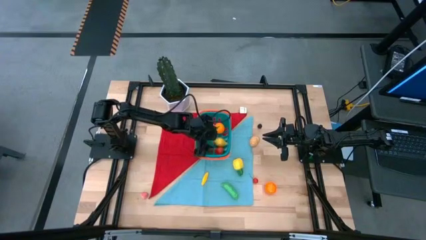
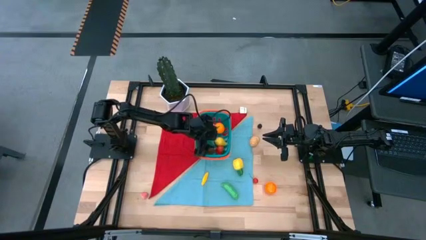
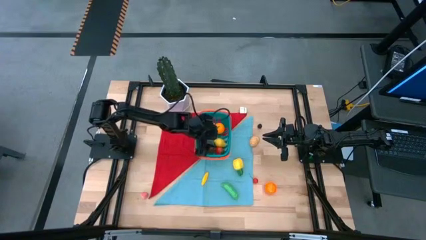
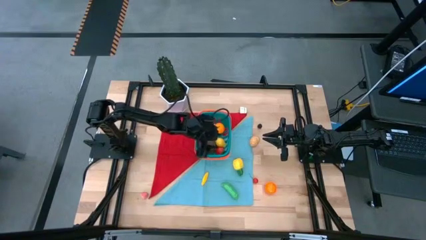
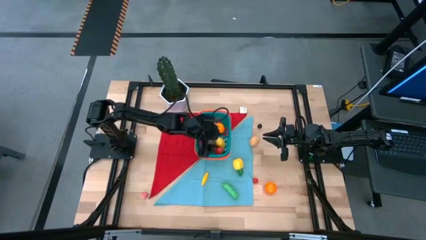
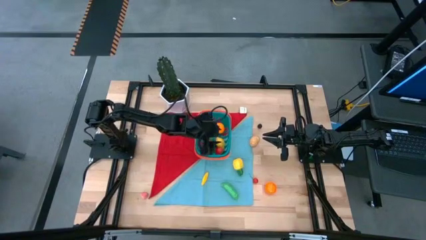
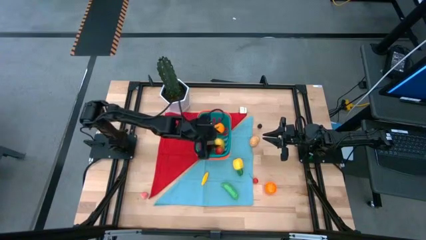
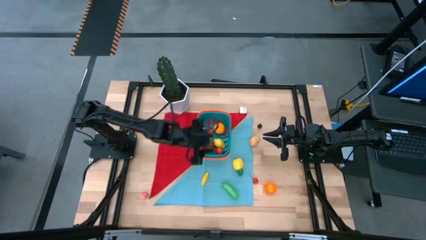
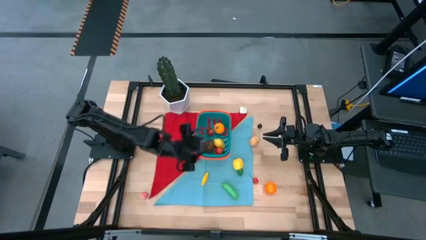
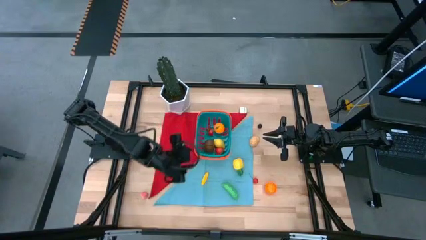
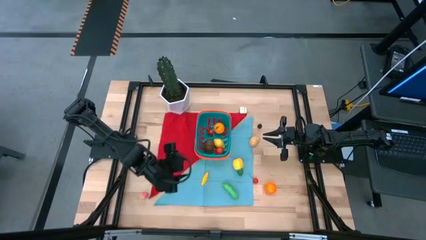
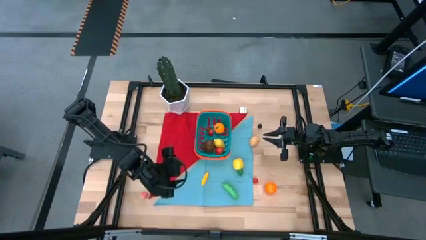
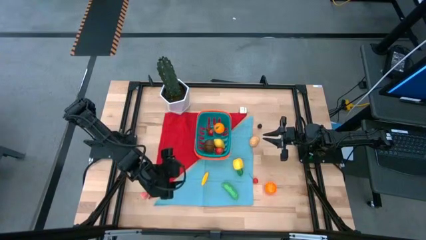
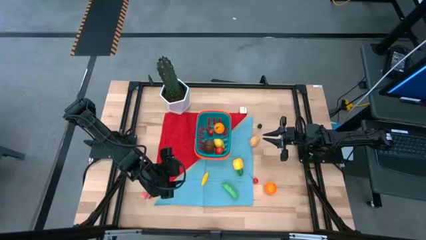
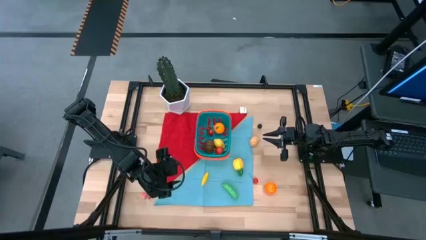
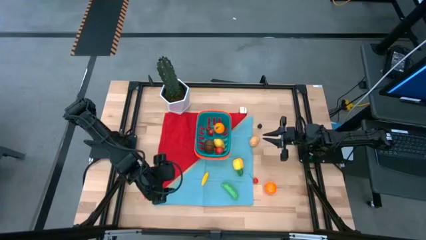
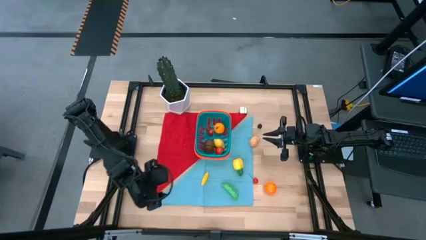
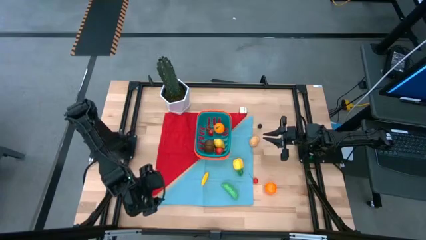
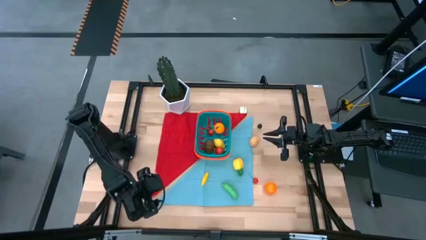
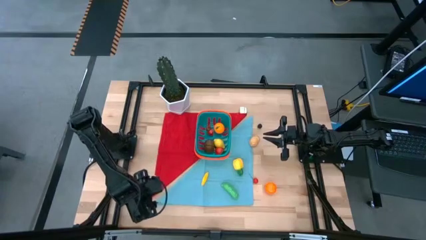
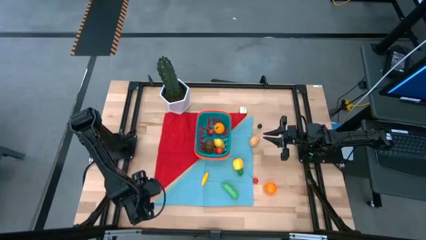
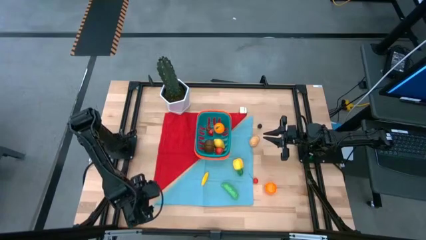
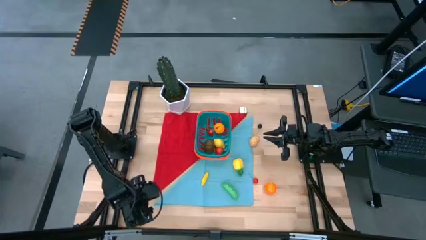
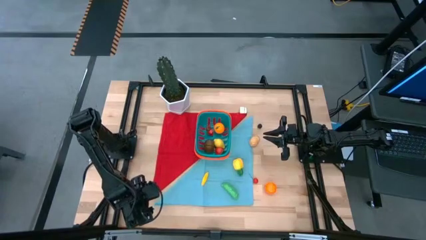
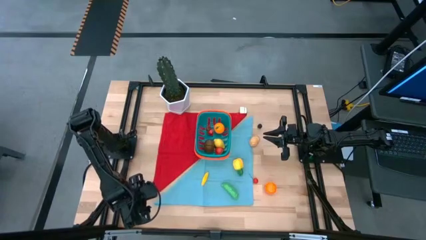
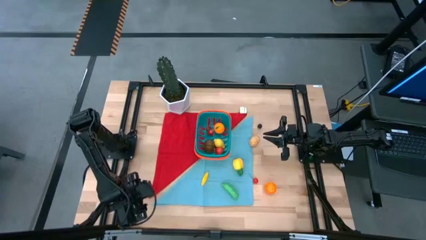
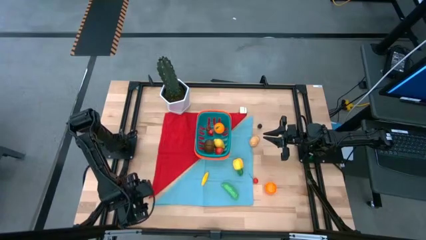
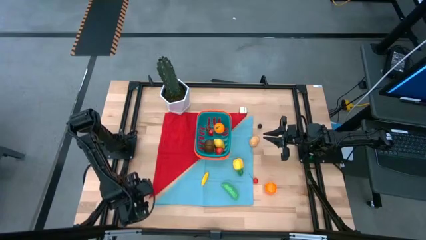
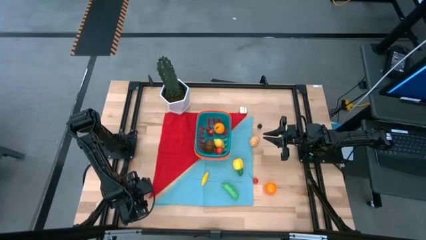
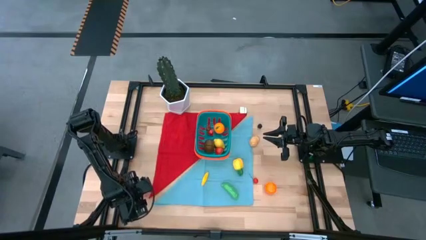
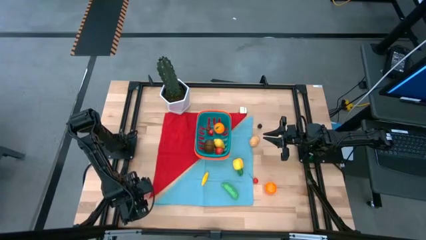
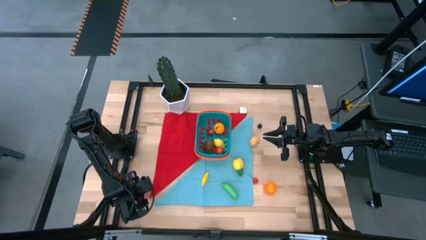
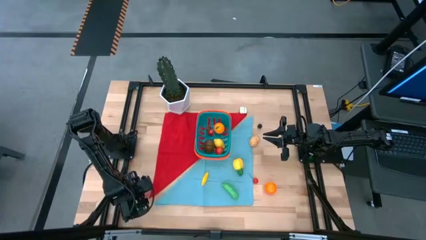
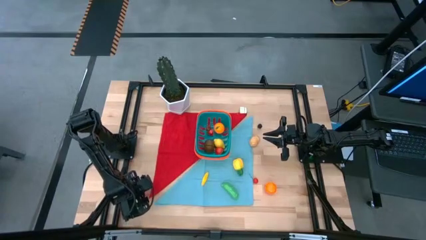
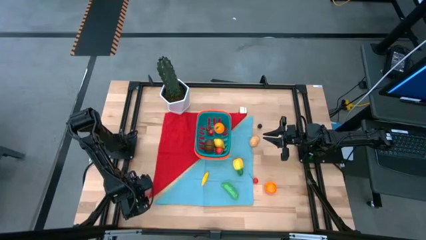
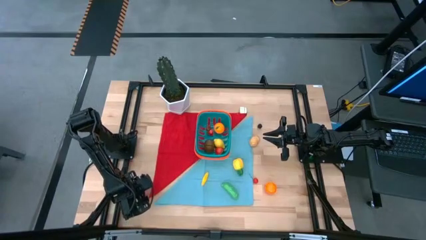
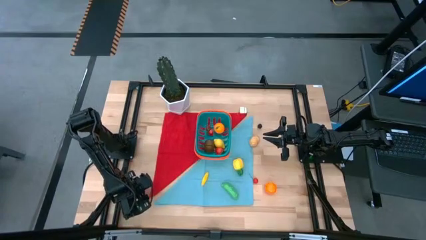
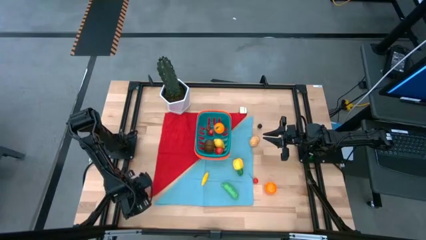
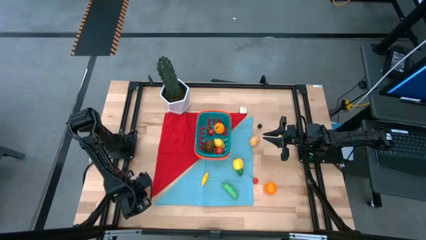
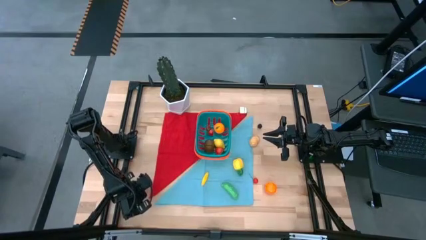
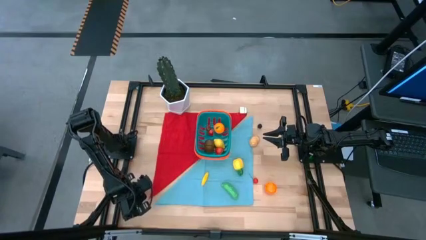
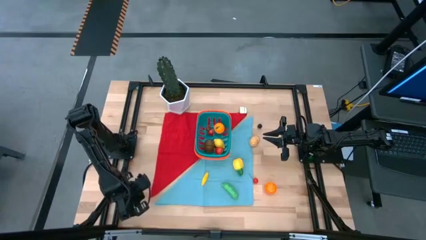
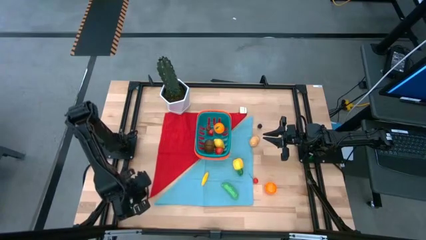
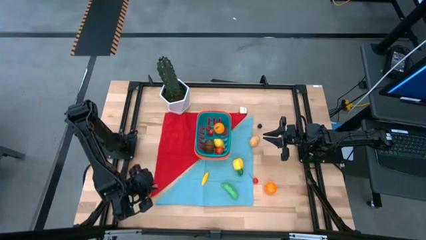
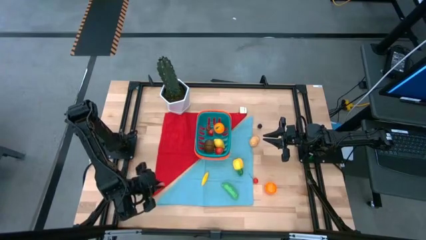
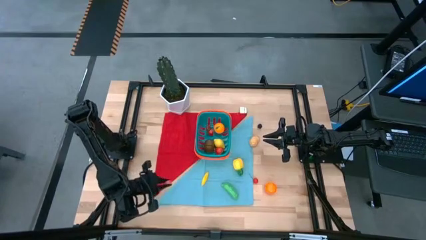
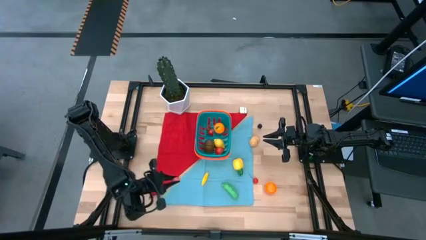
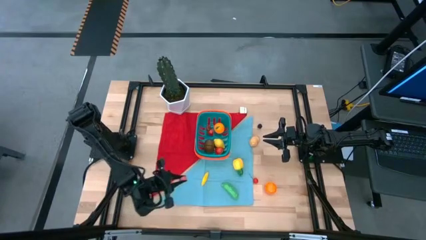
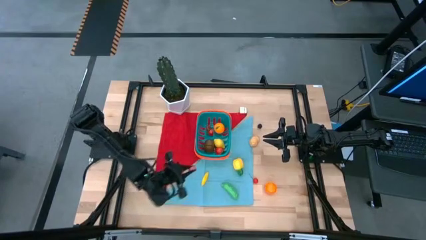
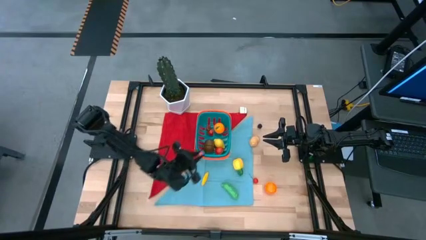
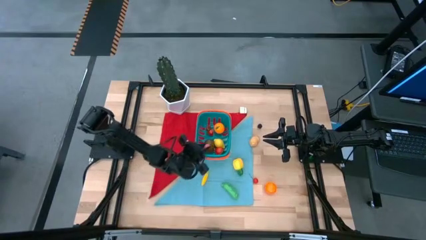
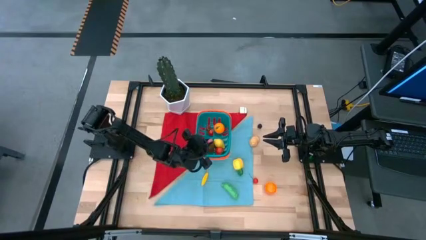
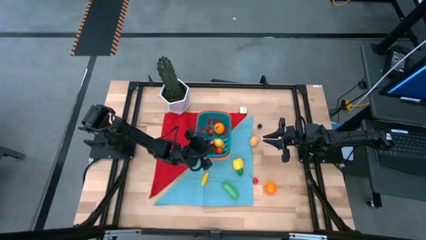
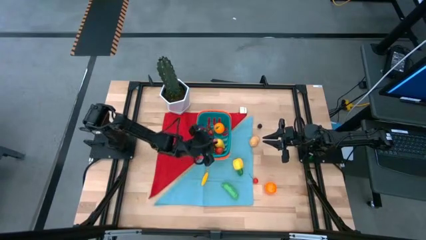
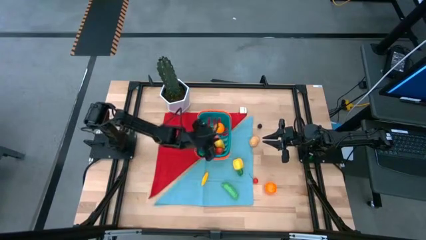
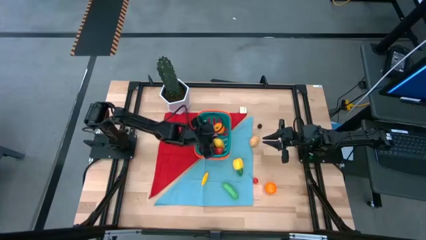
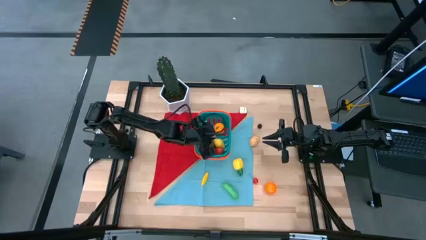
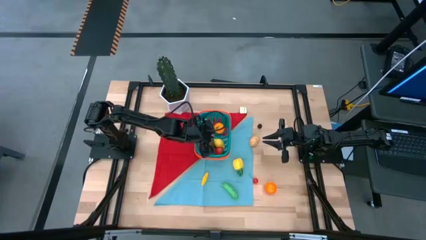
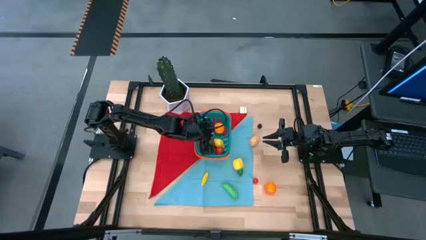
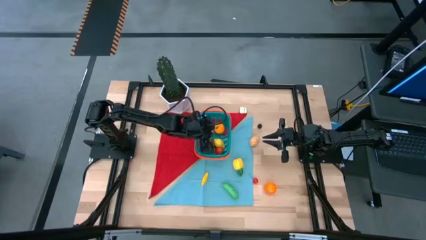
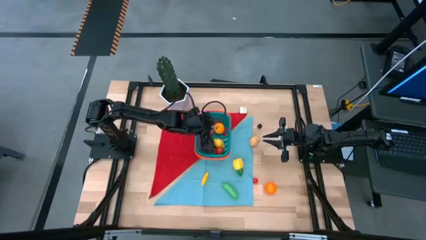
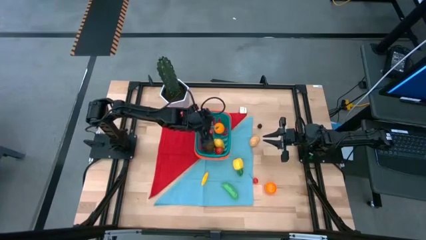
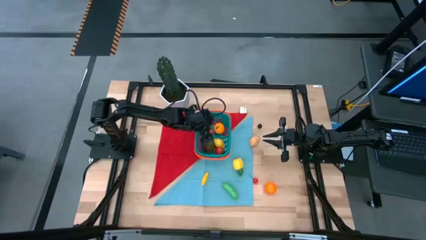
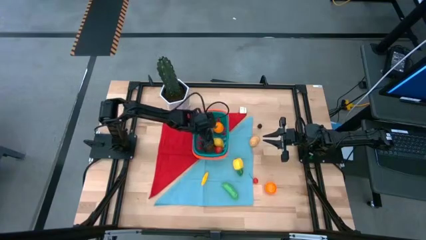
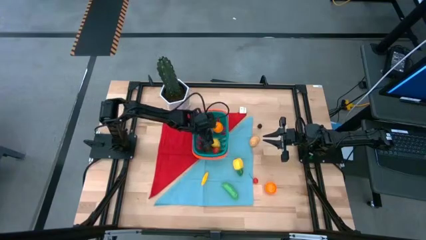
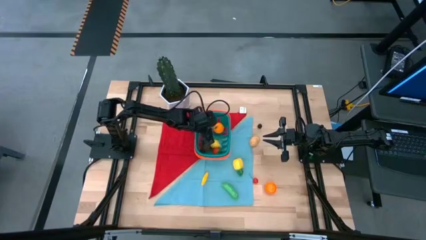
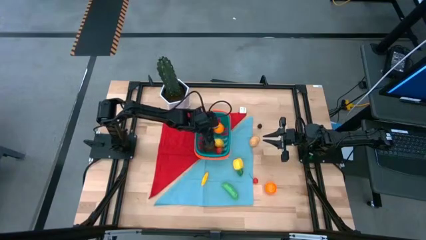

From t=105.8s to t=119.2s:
Task: Pick and placing Produce into tupperware
Put the apricot into the basket

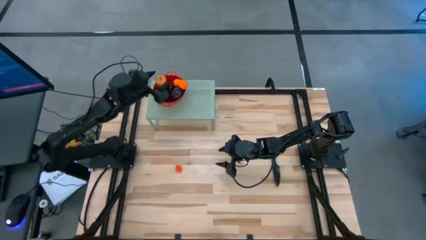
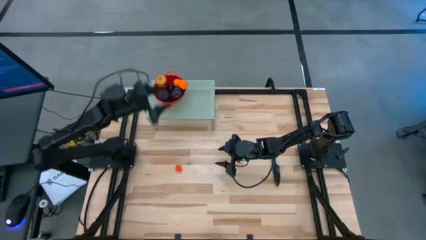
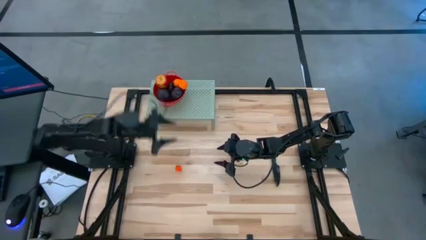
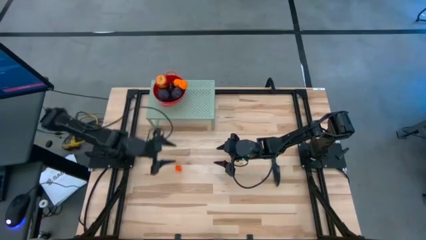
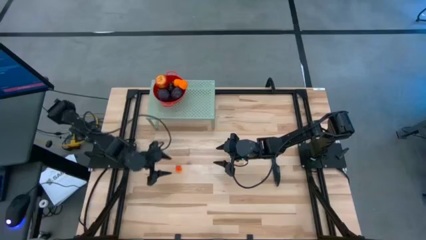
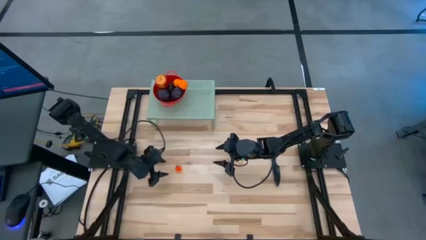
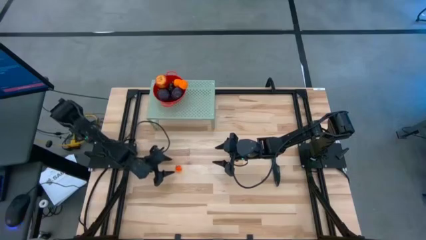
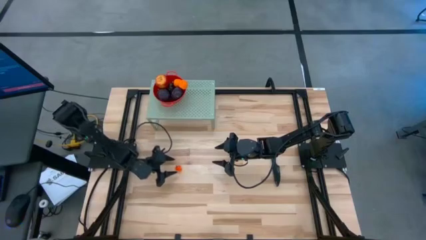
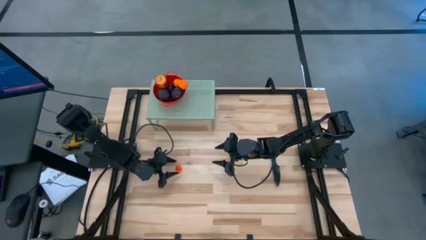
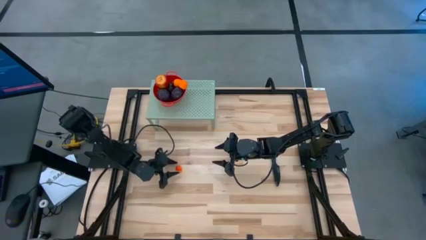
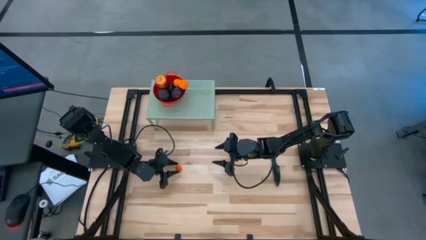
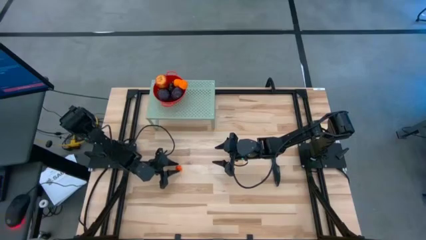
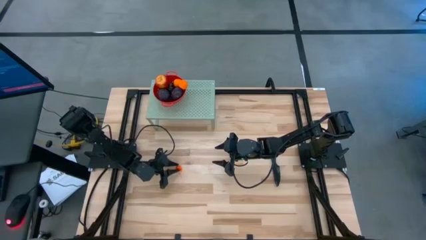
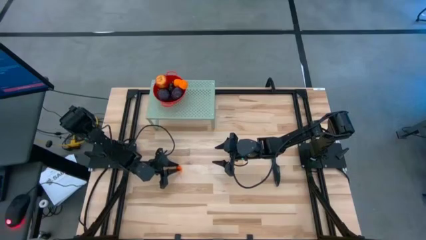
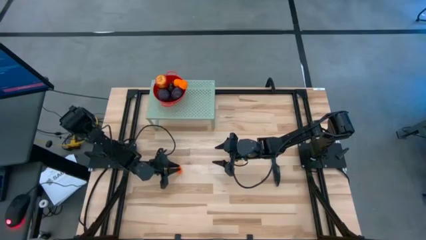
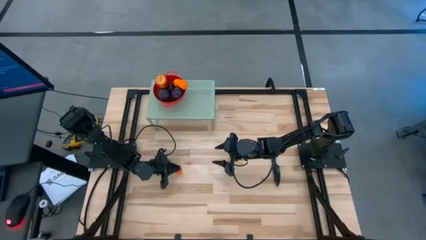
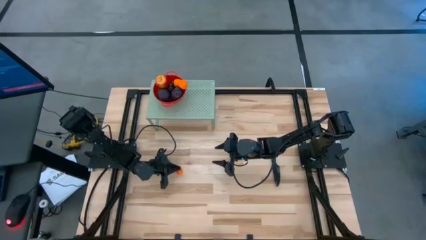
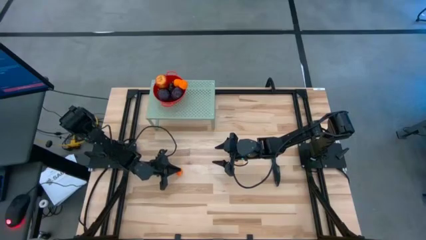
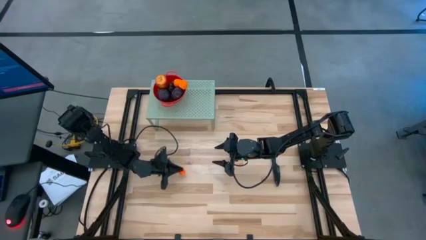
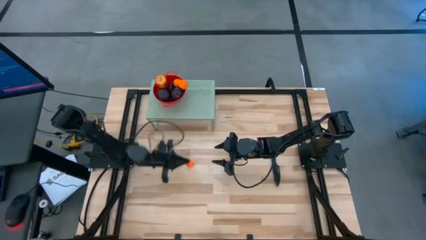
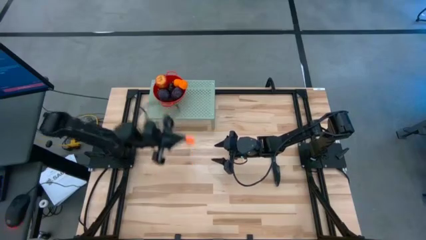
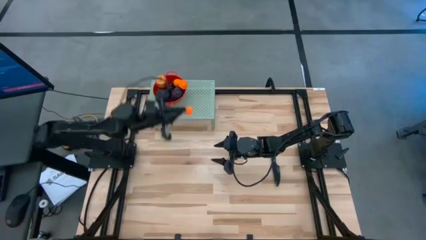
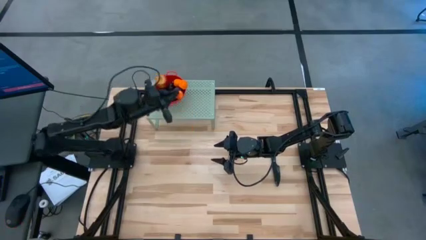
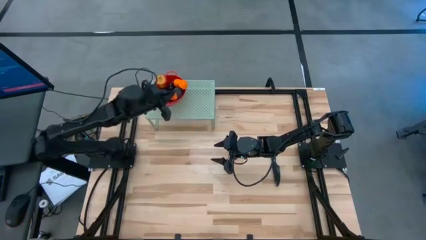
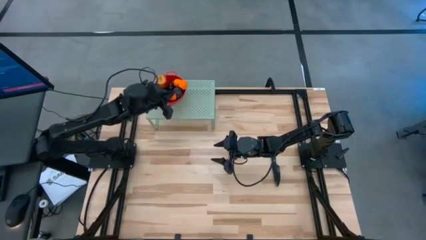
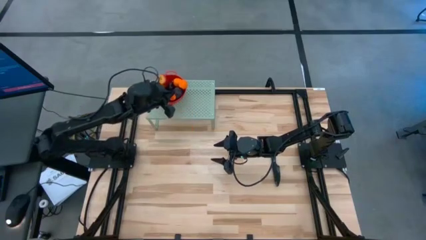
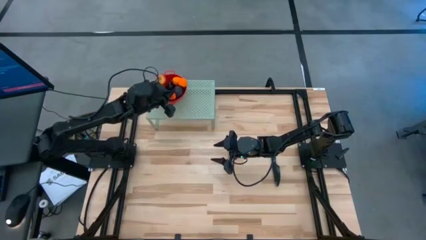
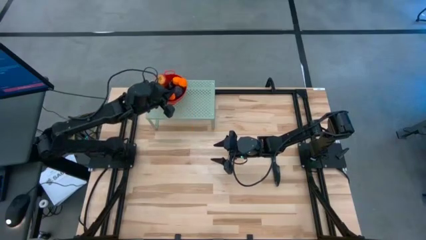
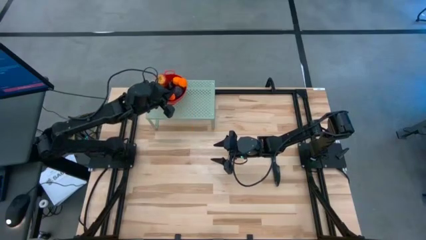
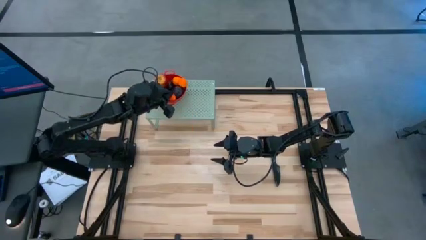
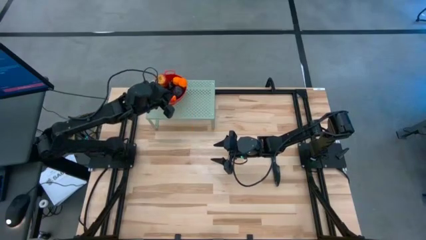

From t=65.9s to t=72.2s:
Task: Pick & Place Fruit
Put the red and yellow pear into the red strainer bowl
